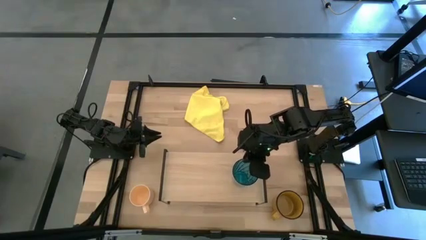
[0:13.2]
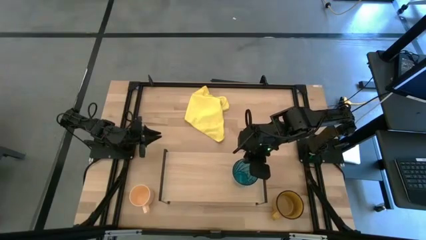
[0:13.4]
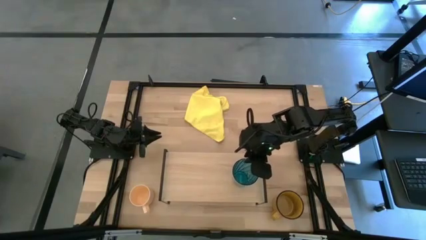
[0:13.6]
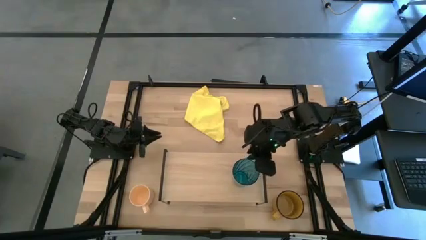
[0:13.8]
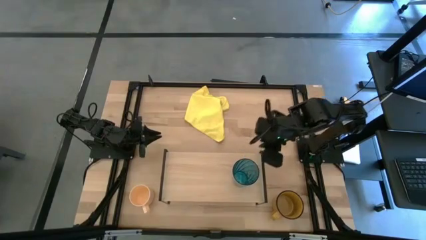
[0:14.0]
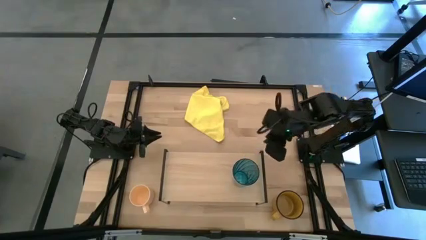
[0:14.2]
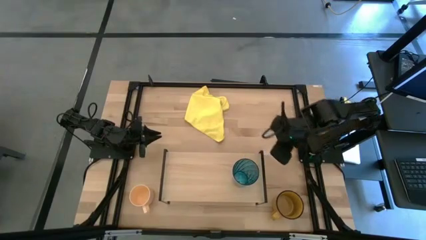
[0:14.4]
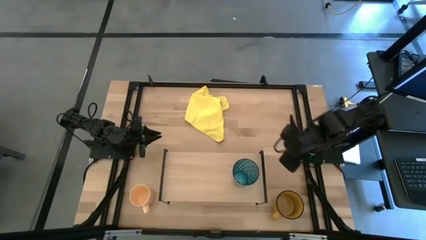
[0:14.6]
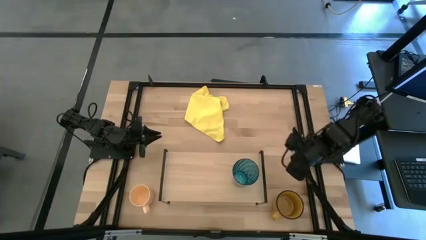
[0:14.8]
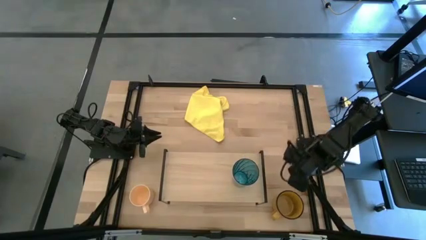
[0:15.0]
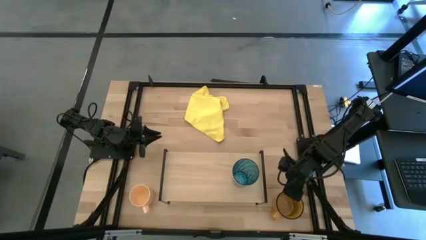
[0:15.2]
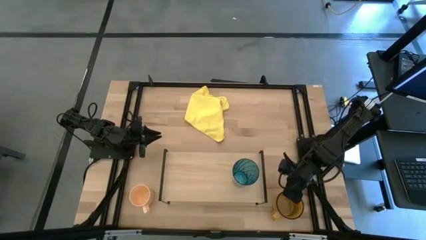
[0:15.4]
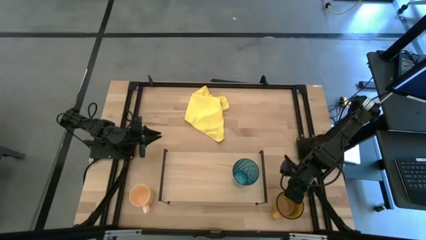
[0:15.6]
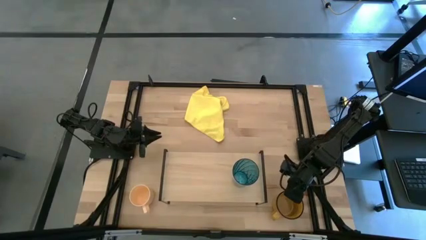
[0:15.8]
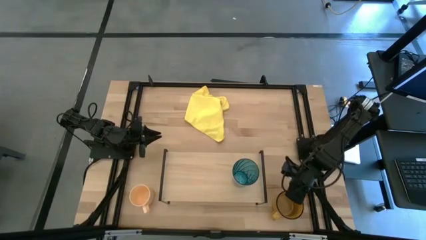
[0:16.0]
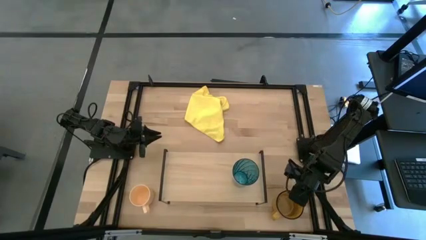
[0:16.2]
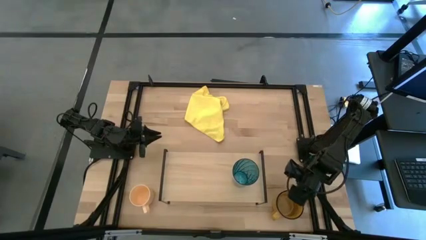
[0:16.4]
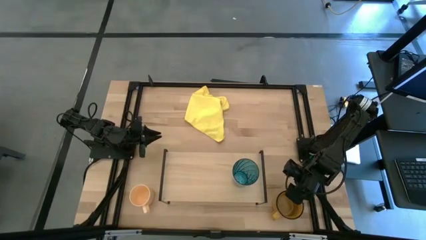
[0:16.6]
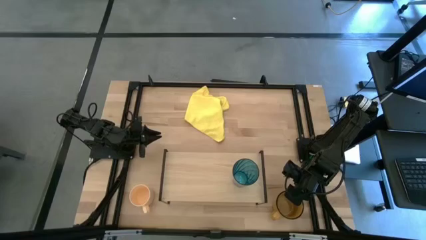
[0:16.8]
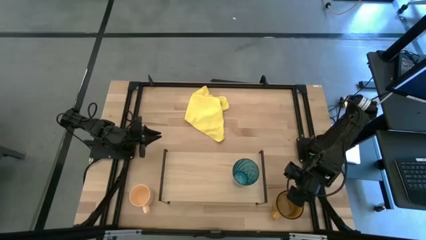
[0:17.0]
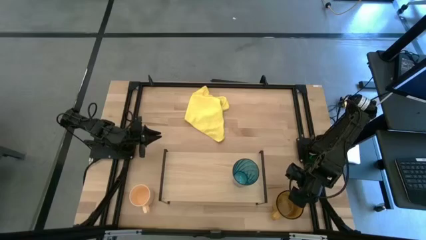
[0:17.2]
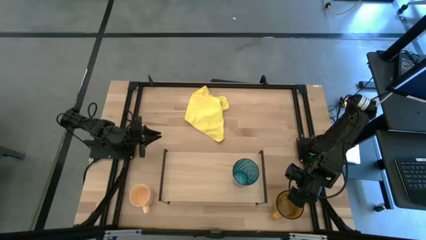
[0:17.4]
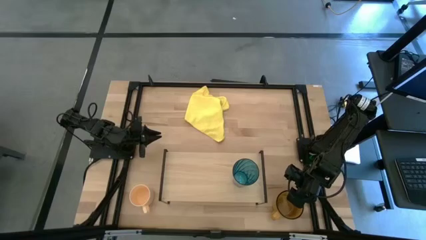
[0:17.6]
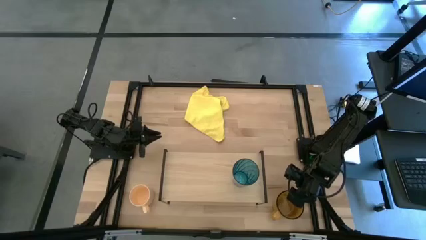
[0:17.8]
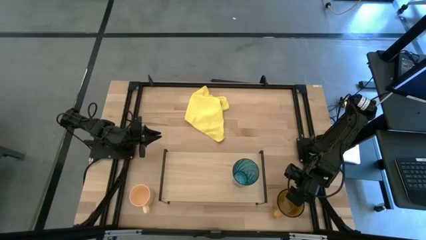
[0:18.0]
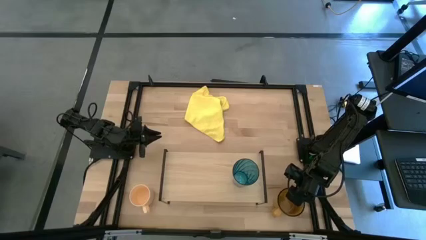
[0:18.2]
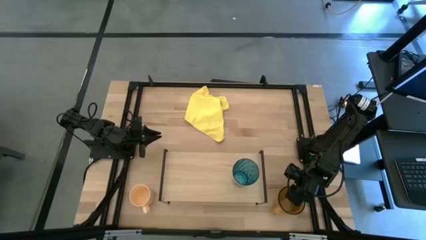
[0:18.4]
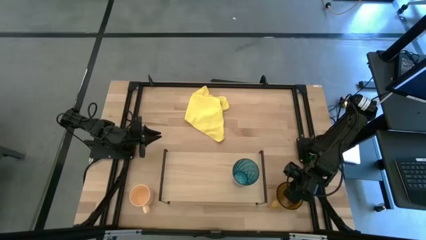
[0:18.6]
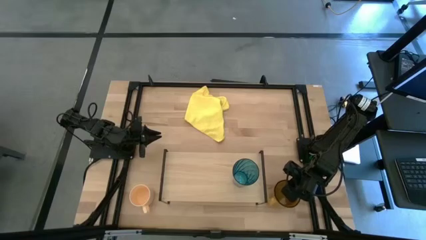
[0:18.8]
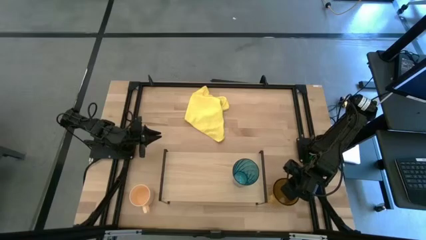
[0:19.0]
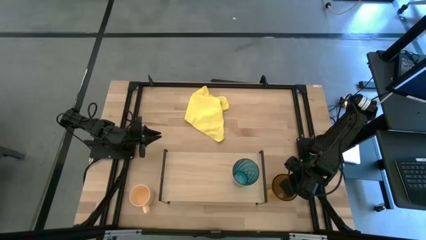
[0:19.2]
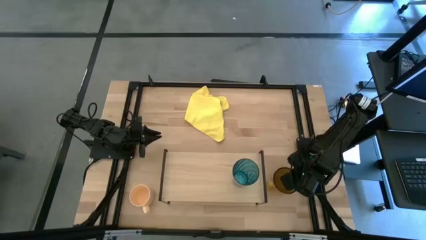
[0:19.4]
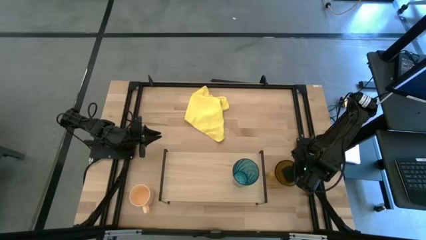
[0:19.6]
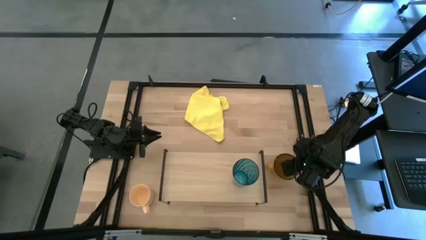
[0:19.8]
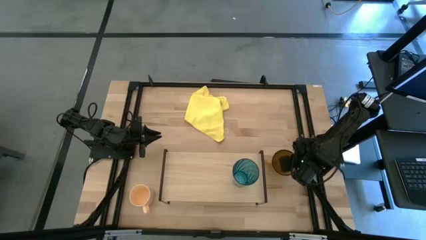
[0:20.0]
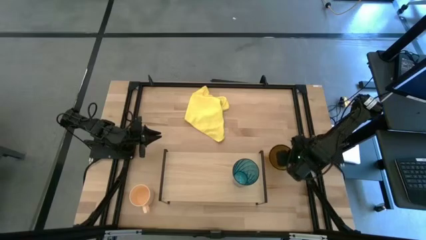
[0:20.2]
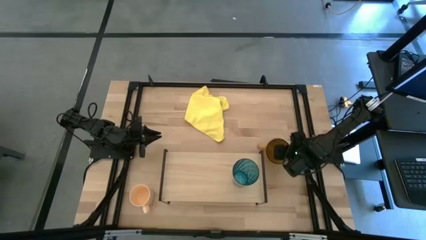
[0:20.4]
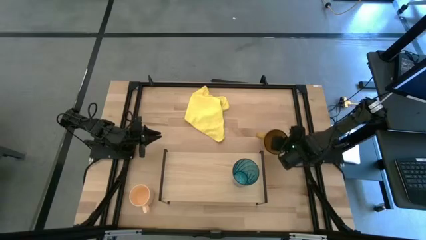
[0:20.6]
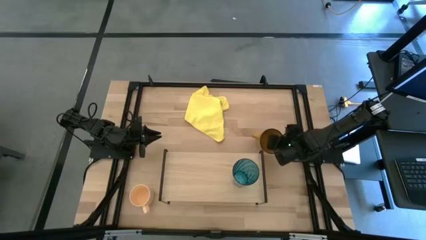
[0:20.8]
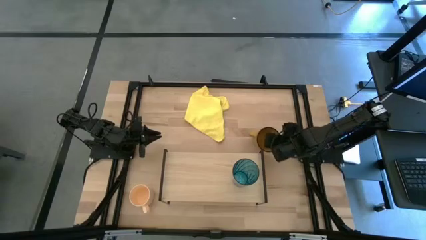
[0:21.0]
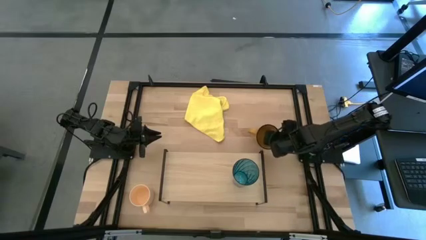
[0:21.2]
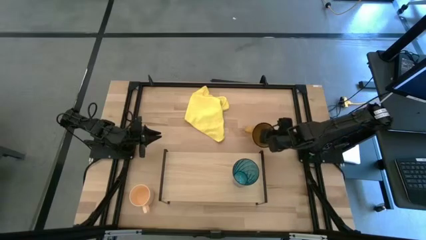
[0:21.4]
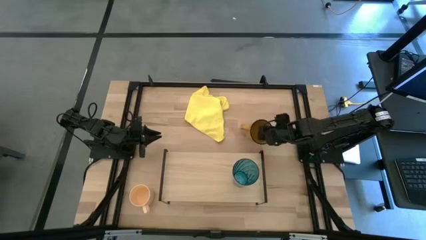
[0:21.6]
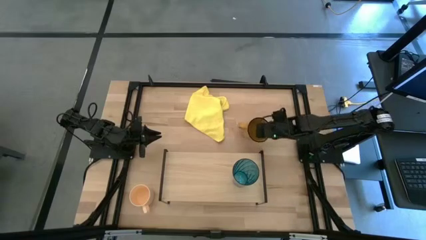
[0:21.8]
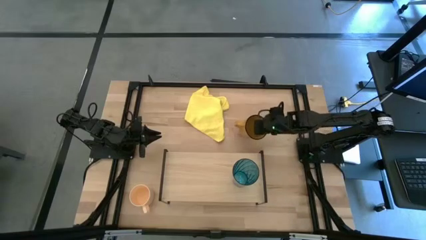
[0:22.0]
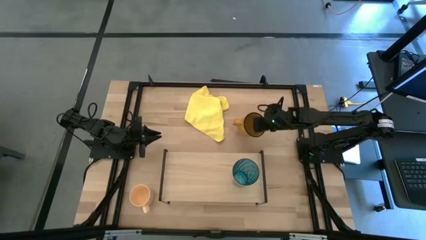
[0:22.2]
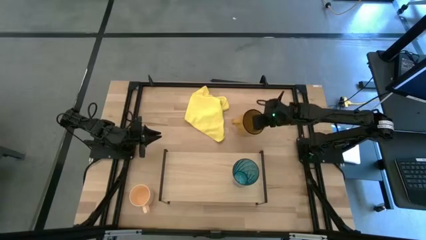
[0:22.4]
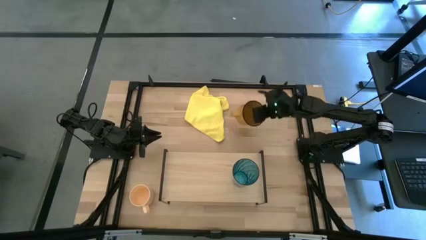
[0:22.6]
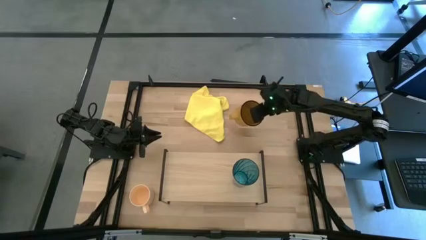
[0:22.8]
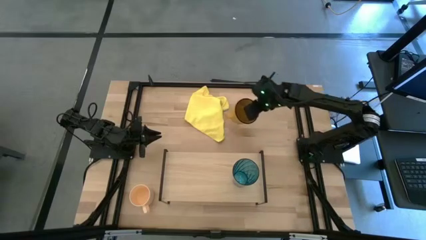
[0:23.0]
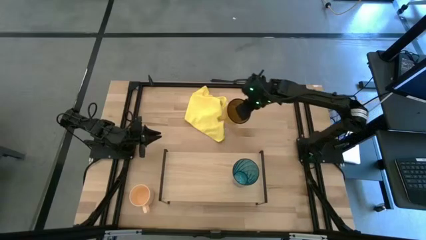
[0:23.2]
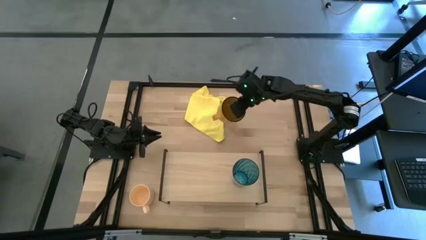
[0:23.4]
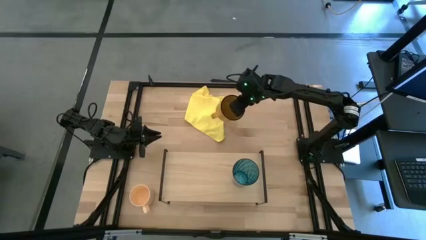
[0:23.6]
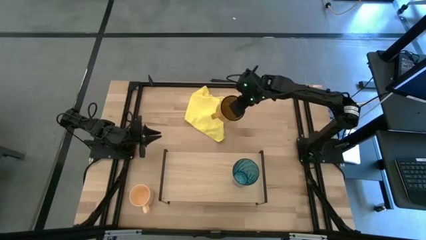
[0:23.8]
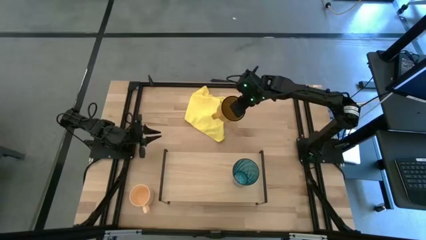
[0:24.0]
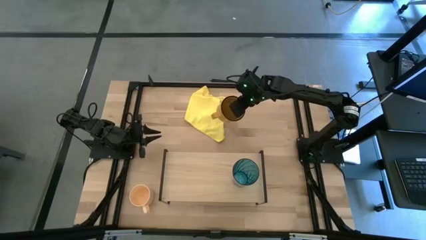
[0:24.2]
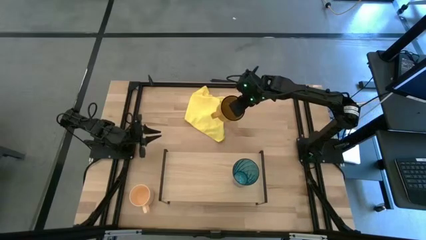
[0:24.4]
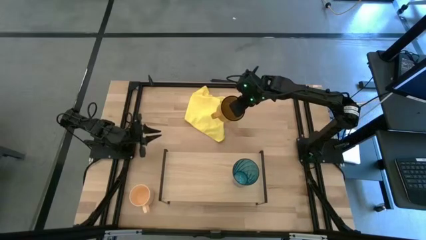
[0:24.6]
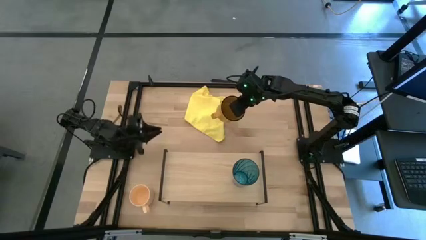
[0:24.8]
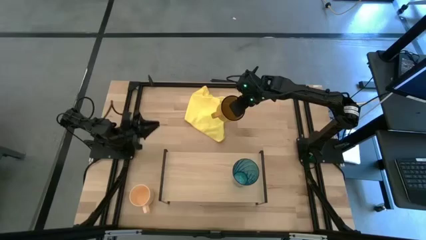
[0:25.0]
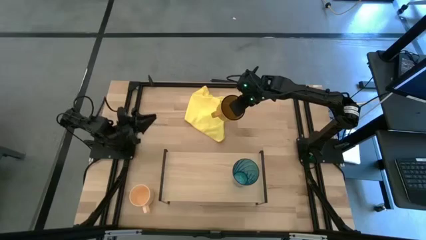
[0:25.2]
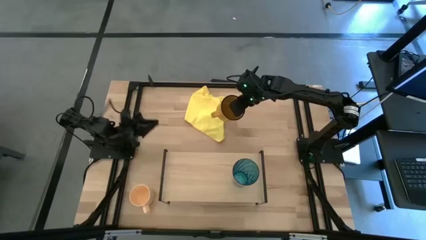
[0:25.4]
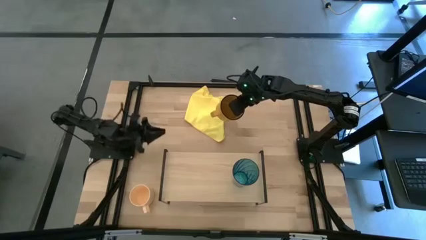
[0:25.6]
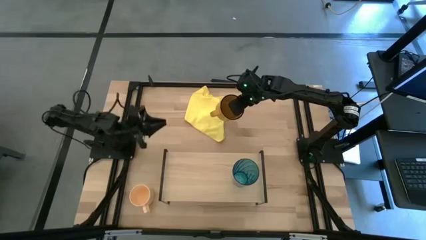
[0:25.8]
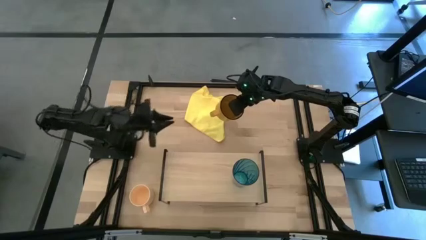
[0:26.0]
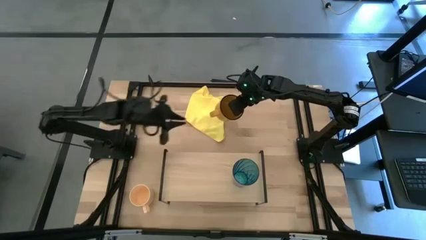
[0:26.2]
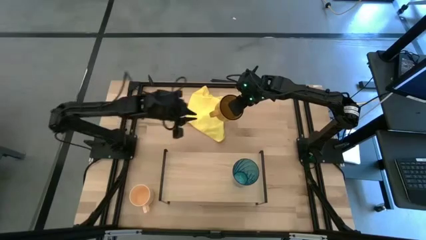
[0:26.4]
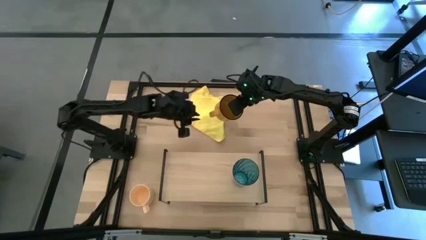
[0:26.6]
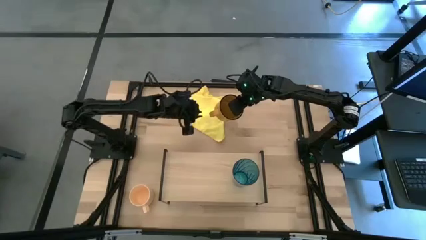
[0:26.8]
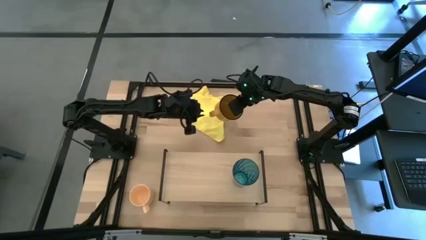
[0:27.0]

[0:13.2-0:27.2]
Task: Stack small to large cups/mugs on shelf
Put the brown mug on the shelf
